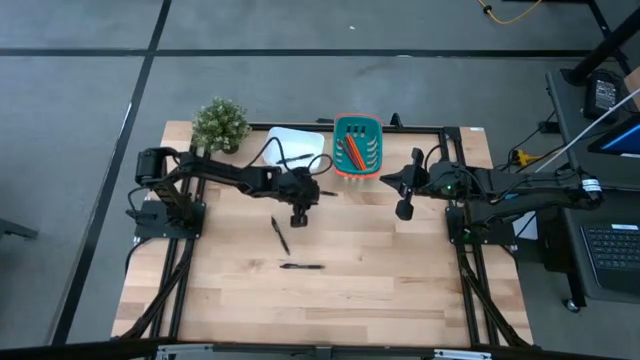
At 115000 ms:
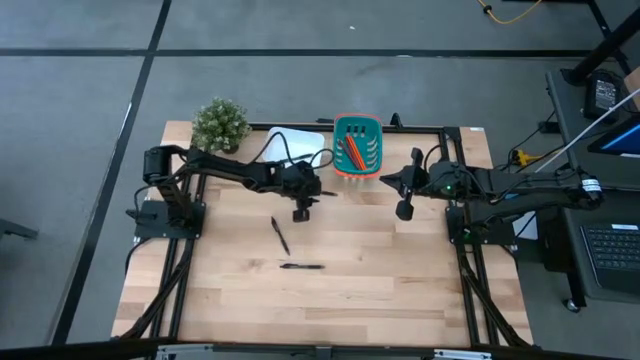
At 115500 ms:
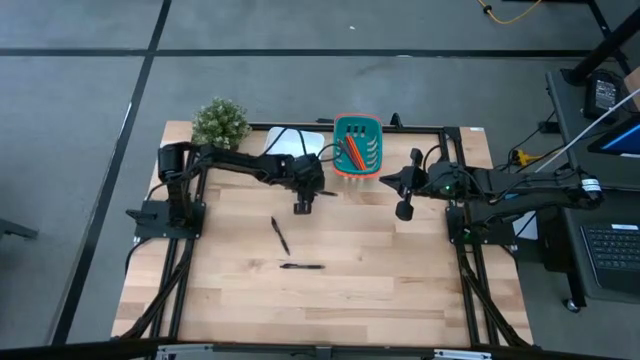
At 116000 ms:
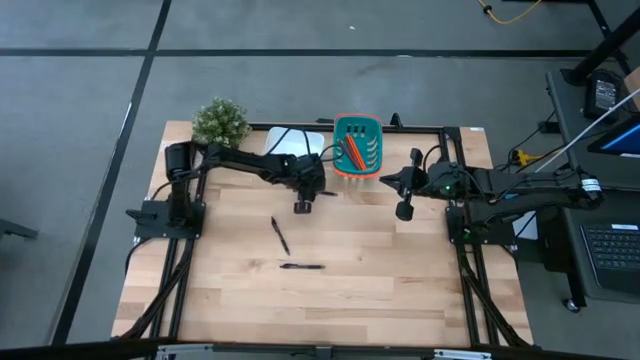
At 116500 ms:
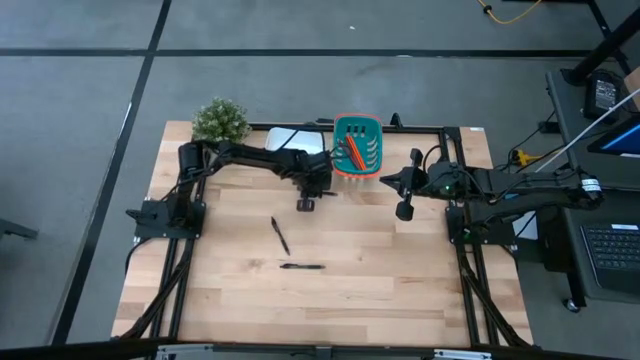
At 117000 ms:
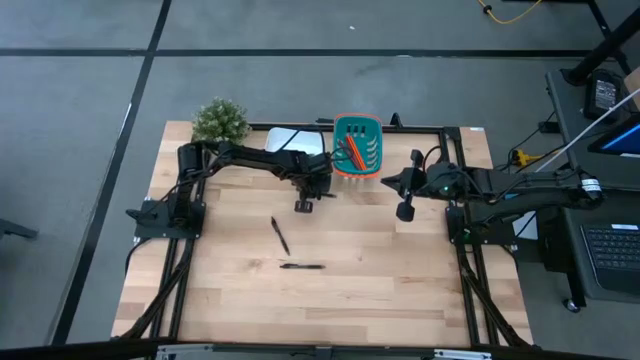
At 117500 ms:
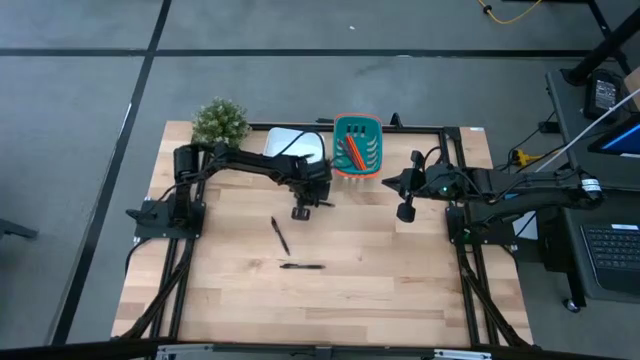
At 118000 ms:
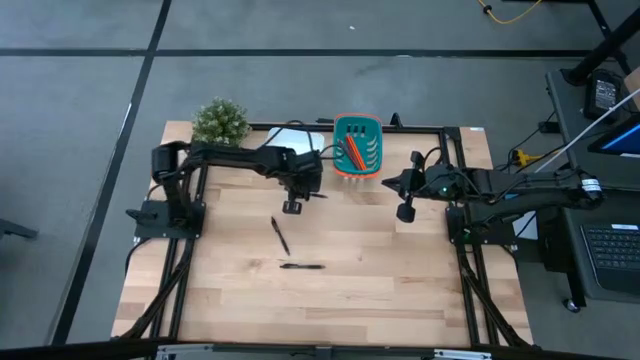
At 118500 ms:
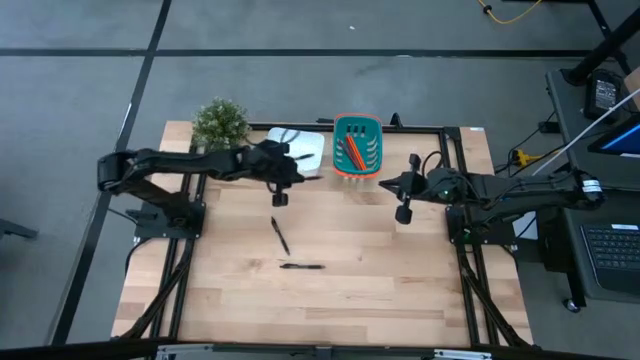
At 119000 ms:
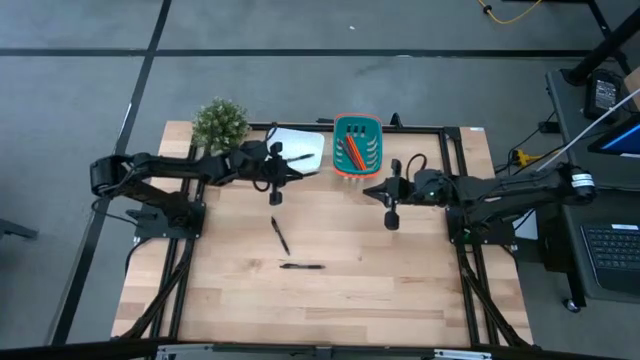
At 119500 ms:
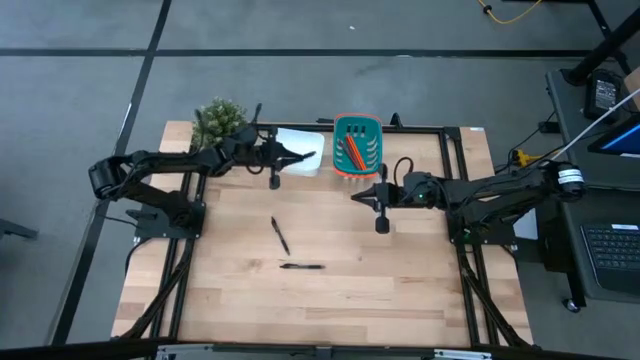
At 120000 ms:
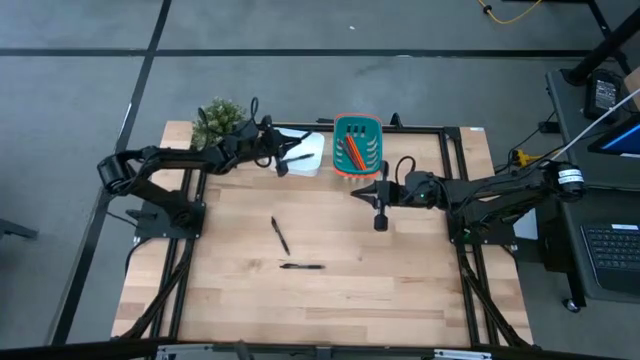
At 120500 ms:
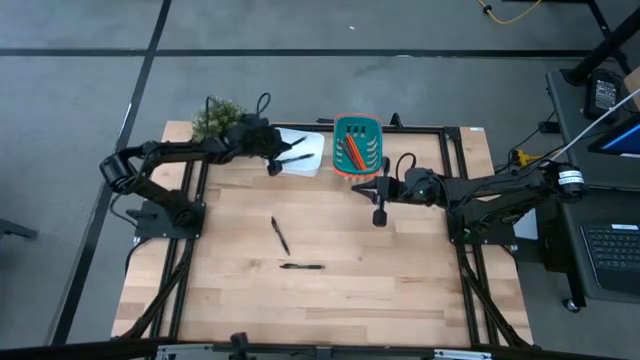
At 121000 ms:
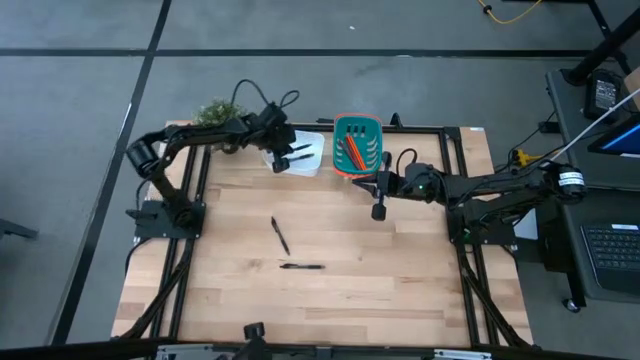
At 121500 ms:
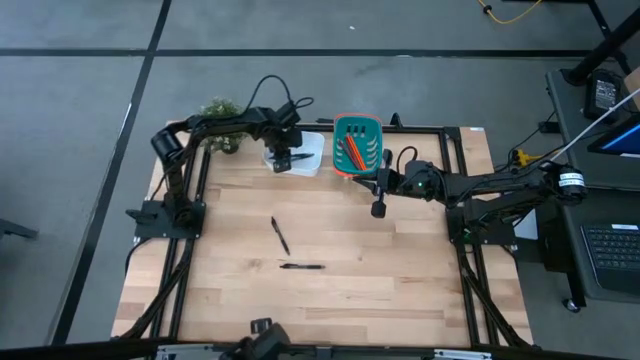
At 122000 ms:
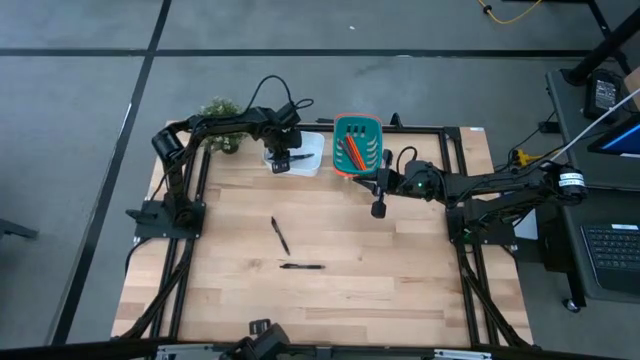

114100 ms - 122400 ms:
Task: Sort pens & pencils
Put the black pen into the white bin

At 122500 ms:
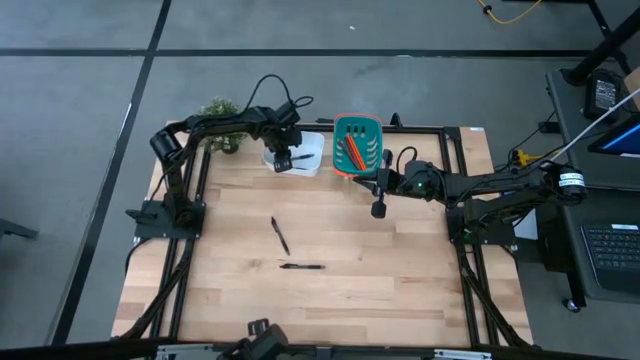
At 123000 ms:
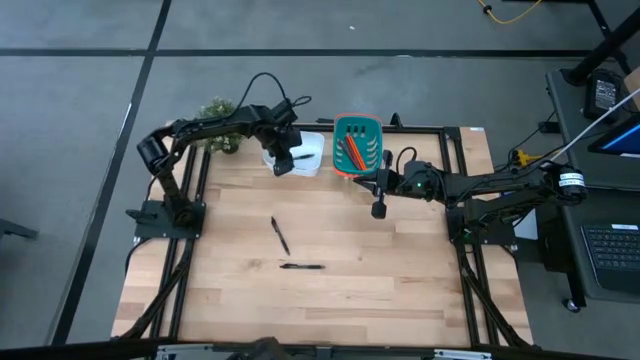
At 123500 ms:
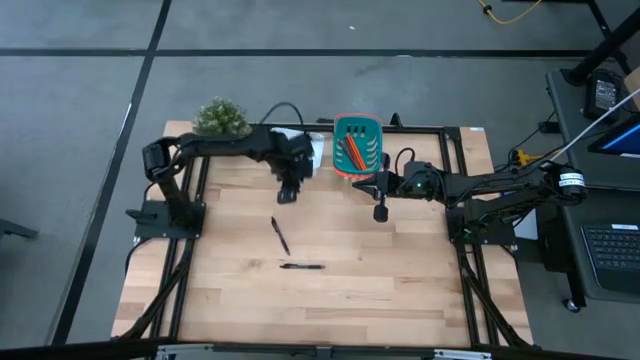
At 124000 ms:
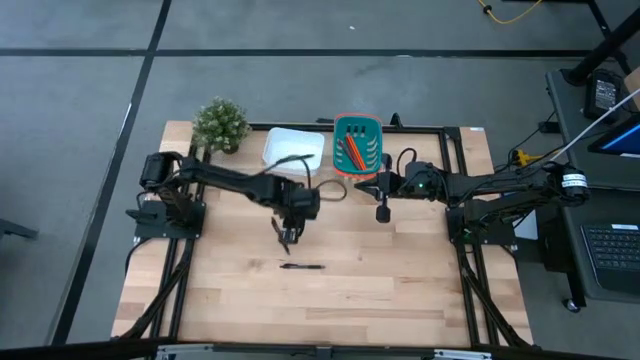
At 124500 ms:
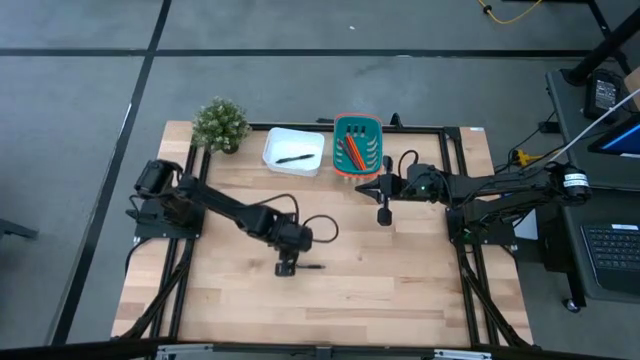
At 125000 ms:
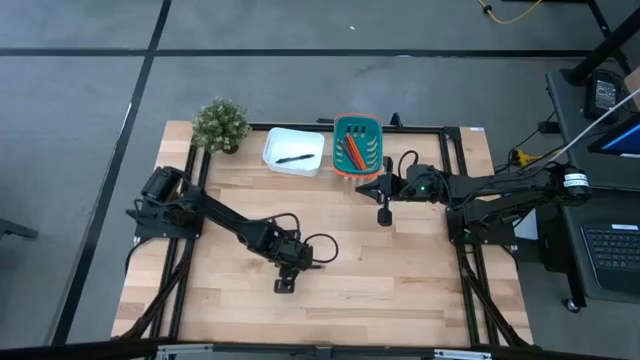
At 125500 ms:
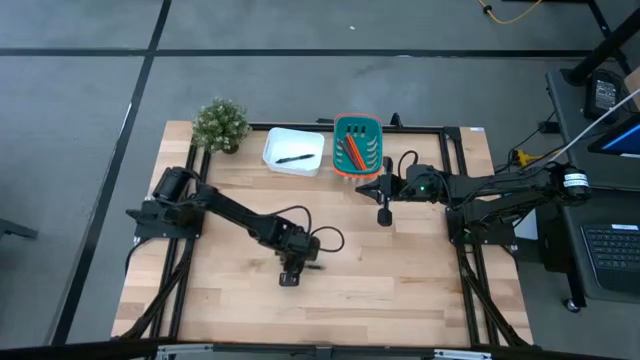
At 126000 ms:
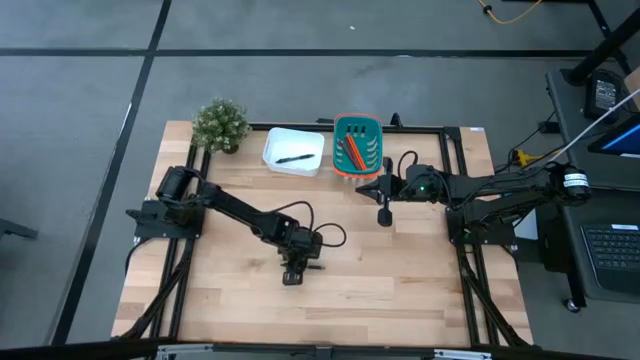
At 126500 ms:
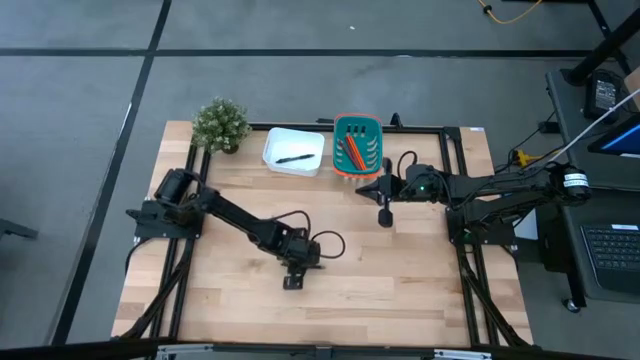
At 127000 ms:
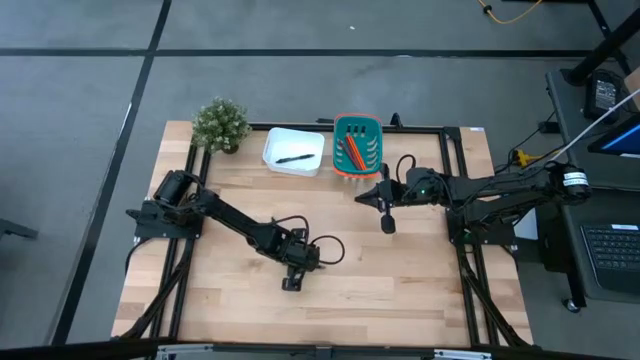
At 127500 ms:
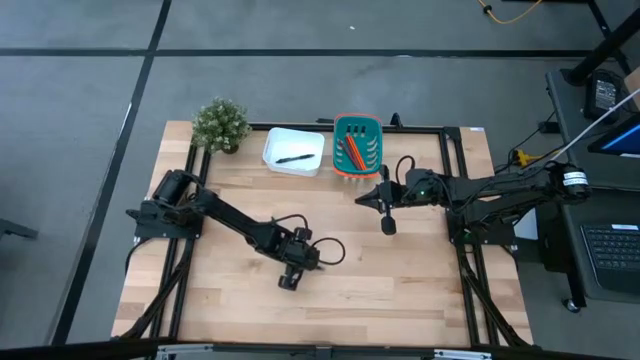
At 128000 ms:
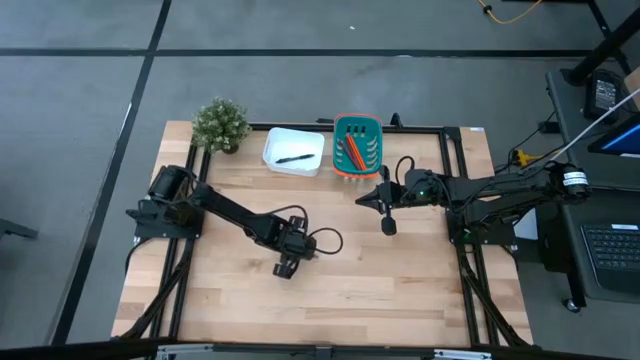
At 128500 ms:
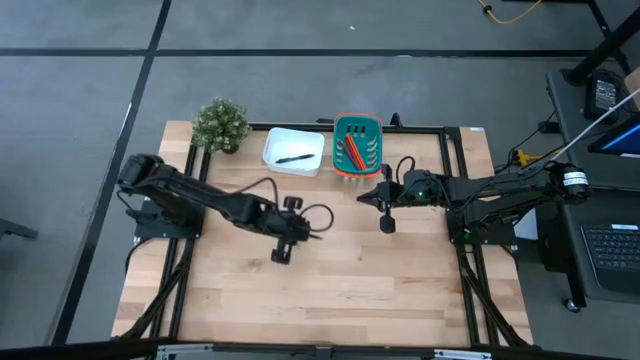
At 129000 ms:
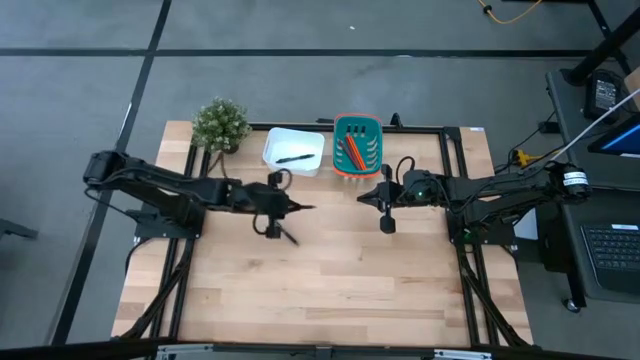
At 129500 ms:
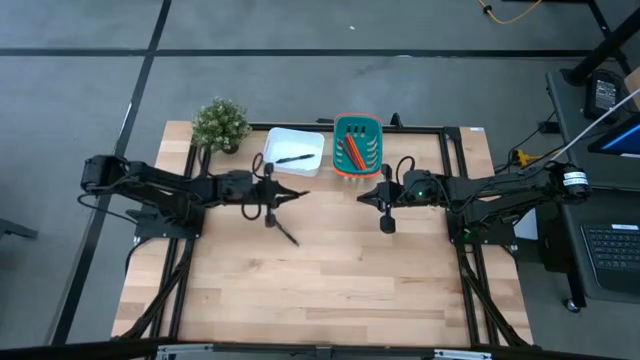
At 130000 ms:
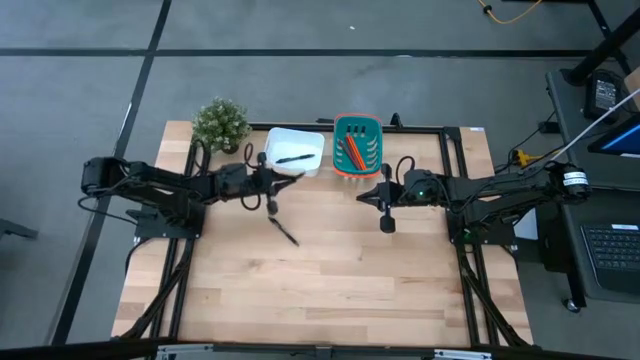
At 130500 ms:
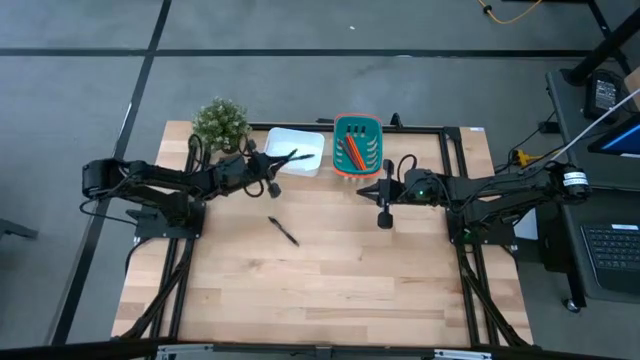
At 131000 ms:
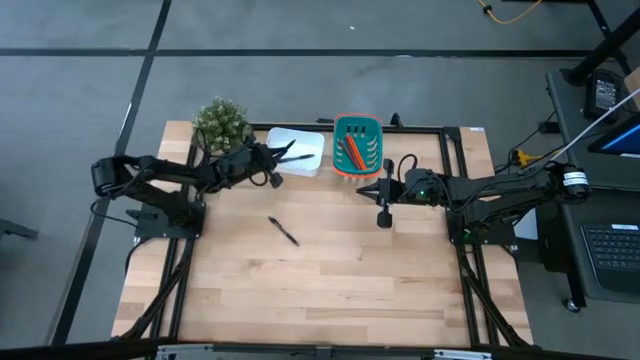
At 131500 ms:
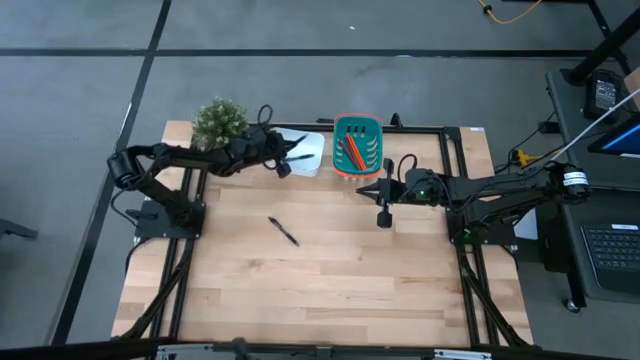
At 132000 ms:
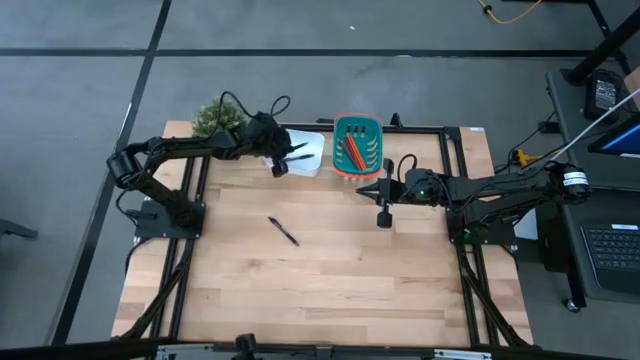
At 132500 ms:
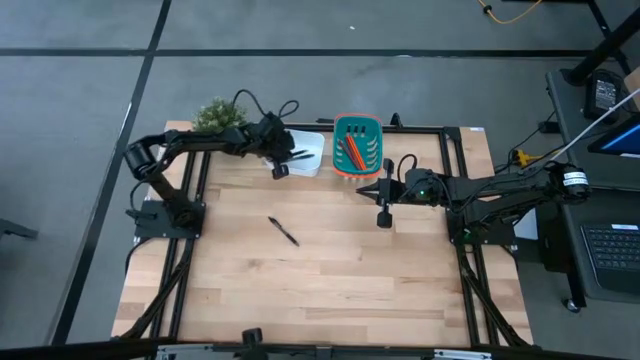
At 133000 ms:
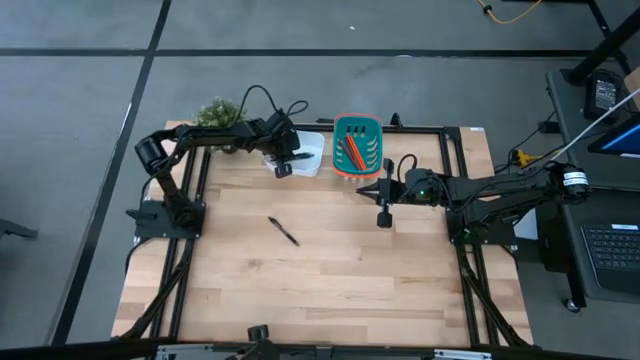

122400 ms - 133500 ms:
Put the top black pen into the white bin

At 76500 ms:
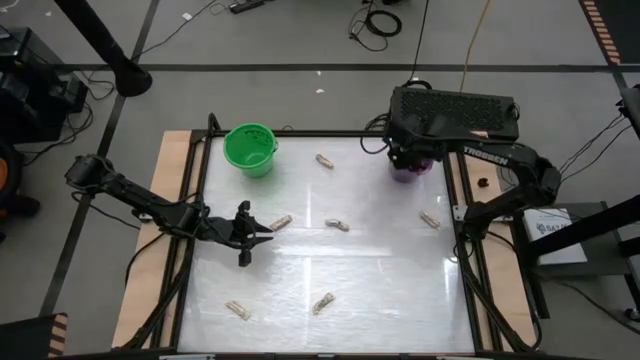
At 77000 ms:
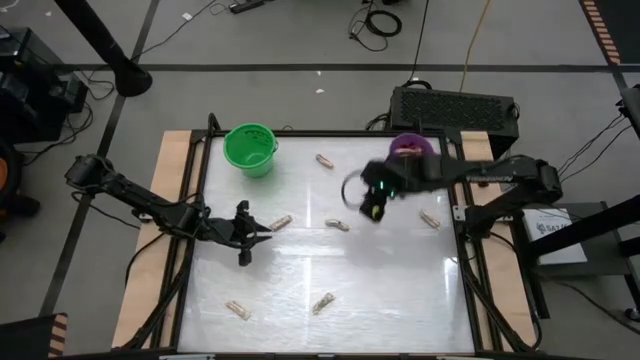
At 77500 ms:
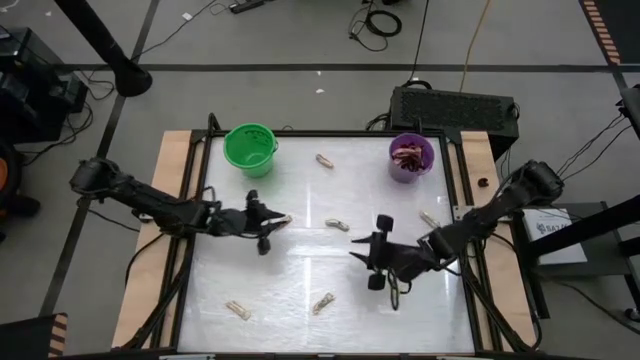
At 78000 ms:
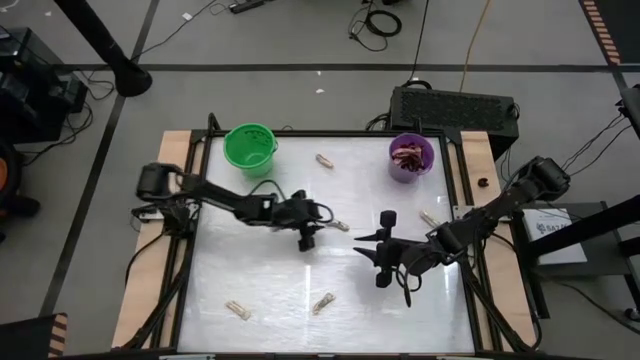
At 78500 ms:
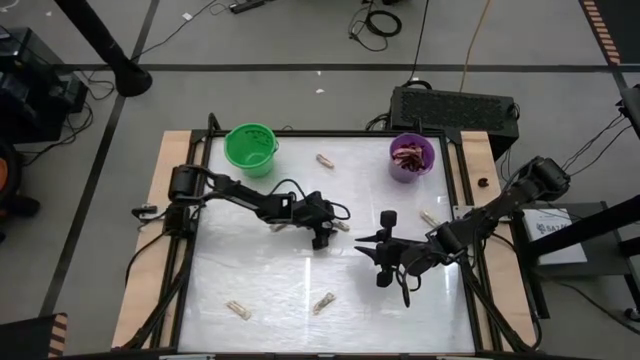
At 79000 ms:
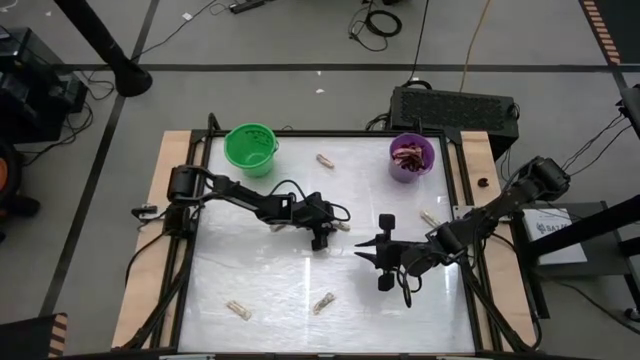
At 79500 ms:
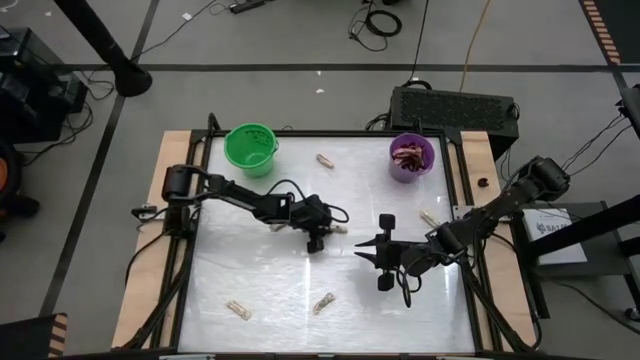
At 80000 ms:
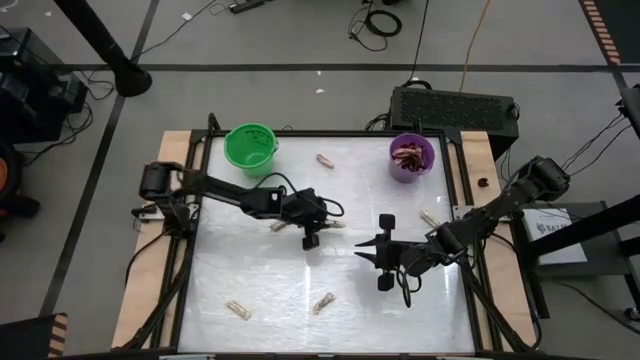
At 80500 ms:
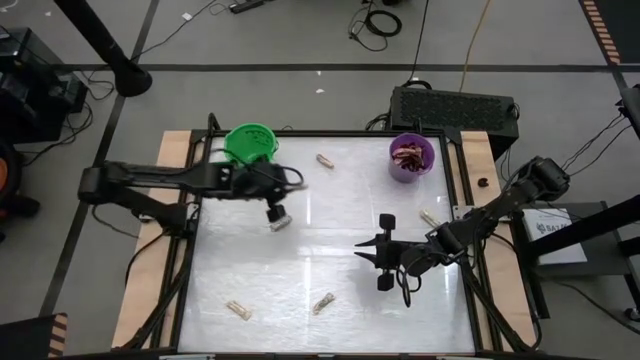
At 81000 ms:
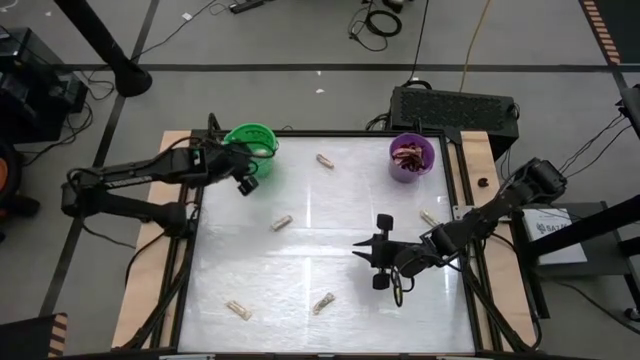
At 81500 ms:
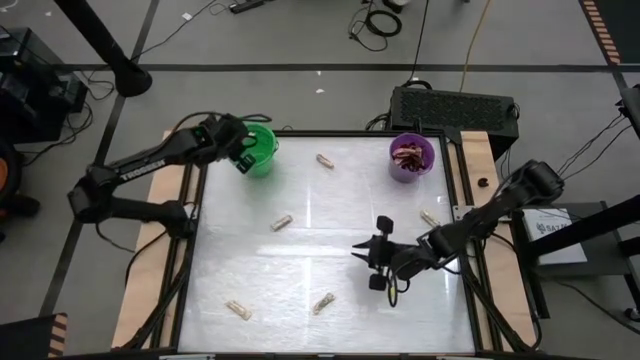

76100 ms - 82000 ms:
Task: Sort candy by brand, put in halloween buckets
Put the white chocolate bar into the green bucket
